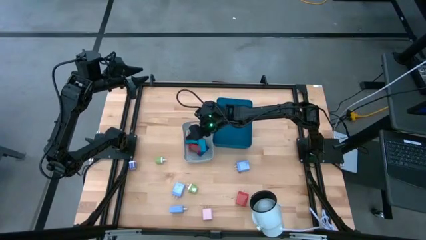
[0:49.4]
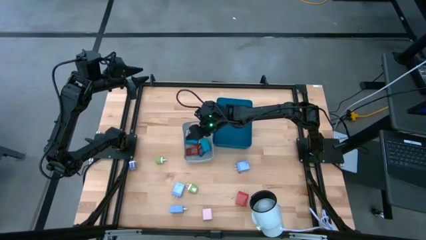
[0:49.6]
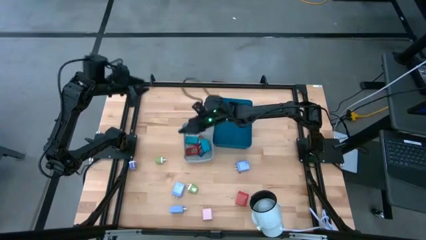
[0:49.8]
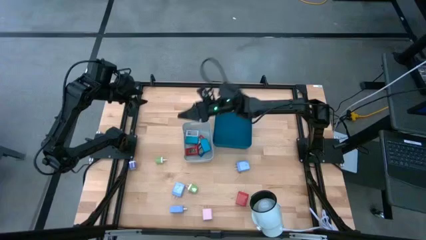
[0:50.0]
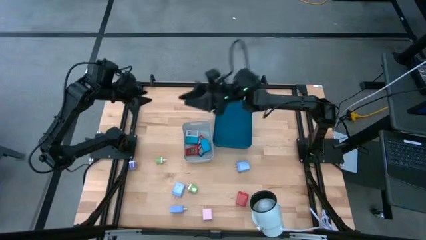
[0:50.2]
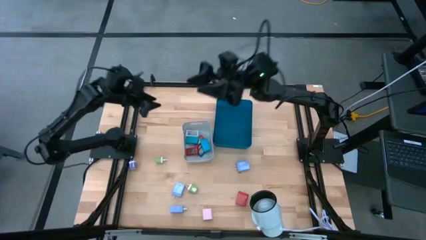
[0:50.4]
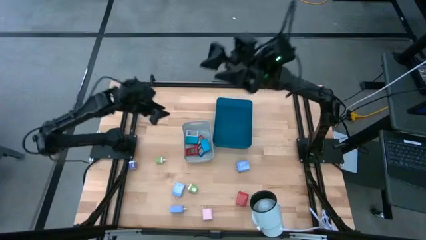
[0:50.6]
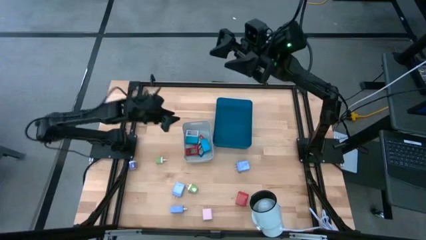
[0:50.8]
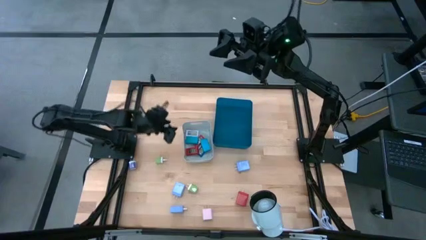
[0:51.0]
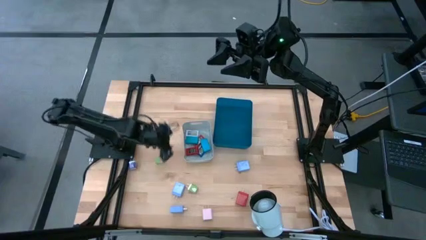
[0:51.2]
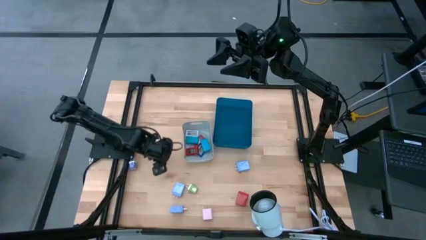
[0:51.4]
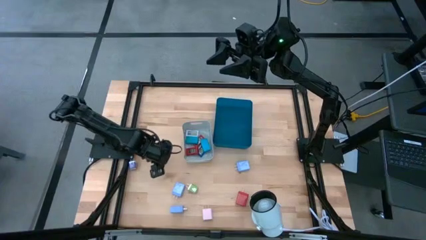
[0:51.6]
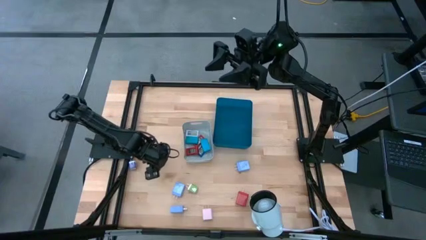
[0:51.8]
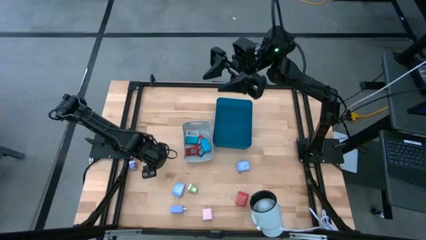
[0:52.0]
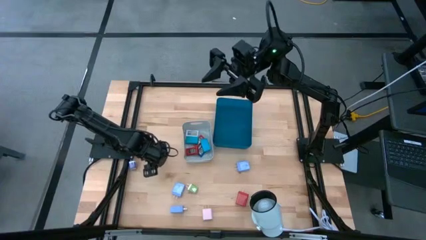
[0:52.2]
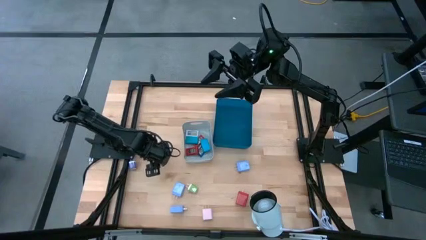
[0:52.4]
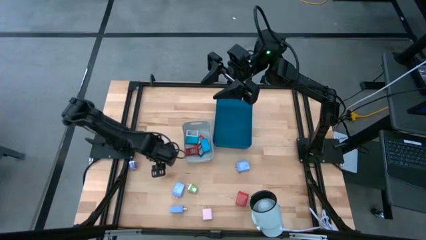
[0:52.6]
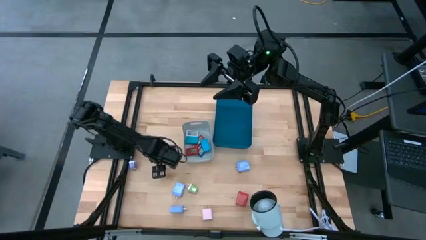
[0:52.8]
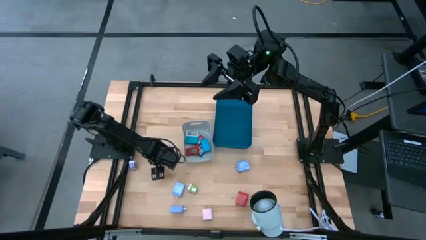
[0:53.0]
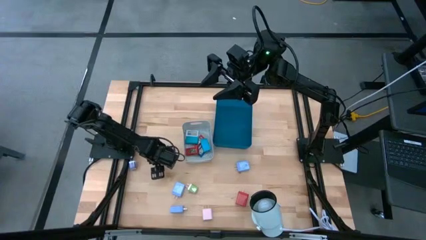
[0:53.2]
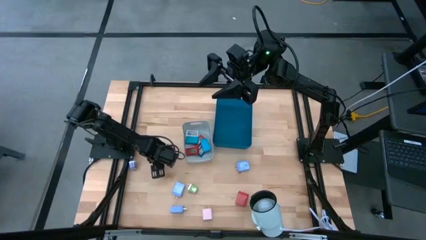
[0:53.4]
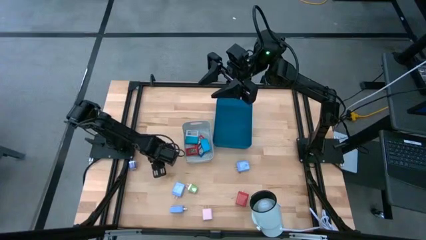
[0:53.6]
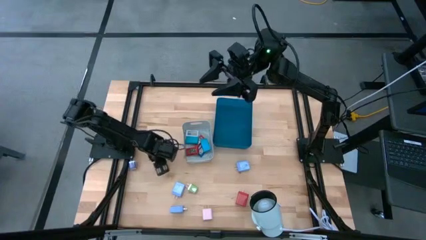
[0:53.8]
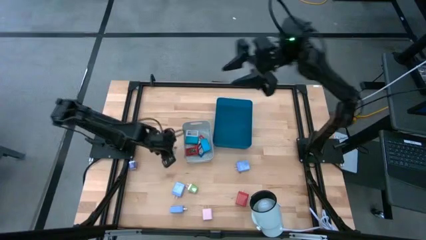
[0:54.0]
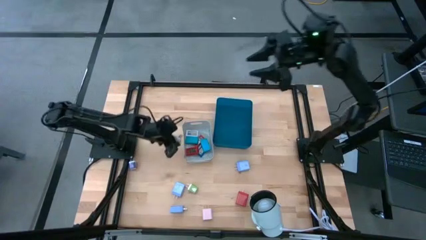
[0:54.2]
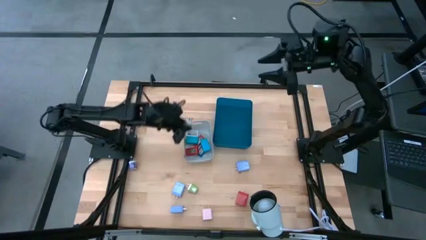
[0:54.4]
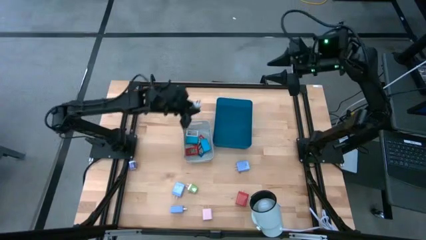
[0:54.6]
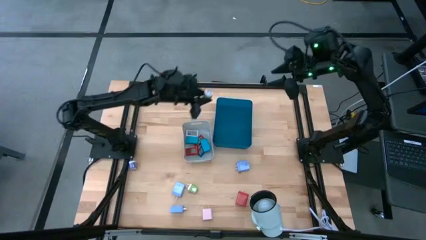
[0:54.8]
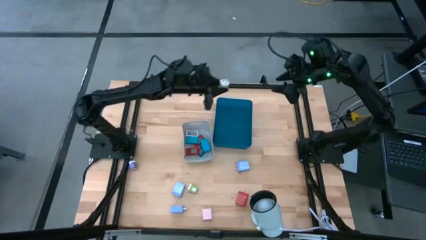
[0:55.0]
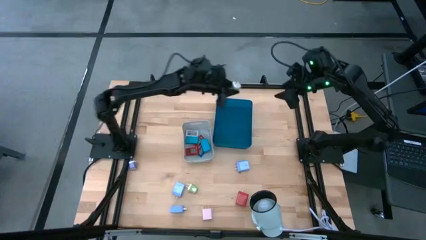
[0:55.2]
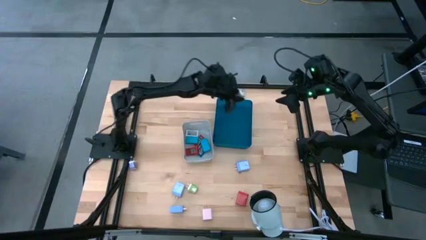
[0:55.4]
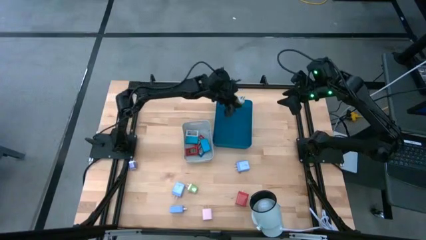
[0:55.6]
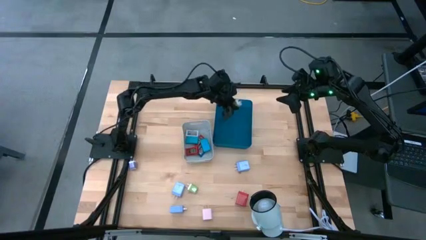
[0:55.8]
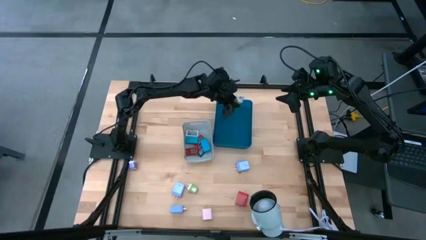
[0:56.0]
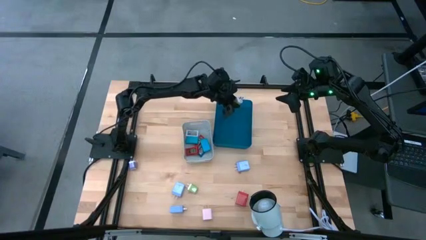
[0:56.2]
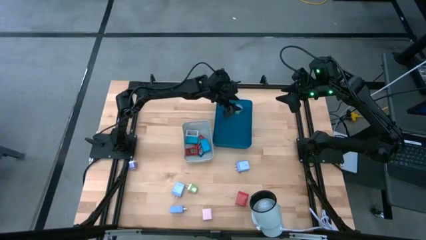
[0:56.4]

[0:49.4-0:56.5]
Task: Pick & Place Office items
Put the top green charger adapter into the blue bin

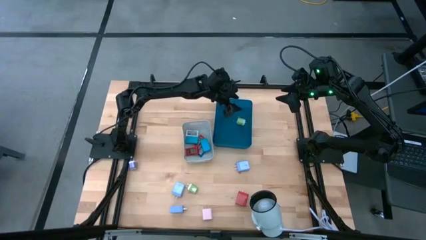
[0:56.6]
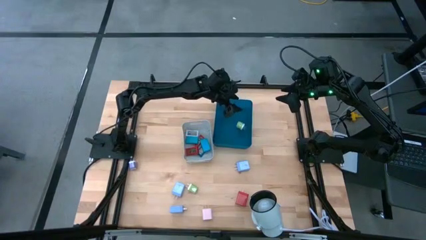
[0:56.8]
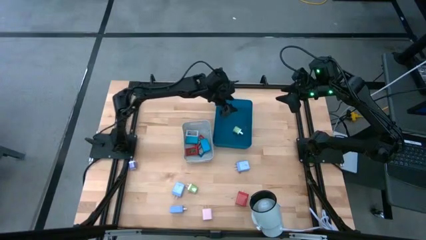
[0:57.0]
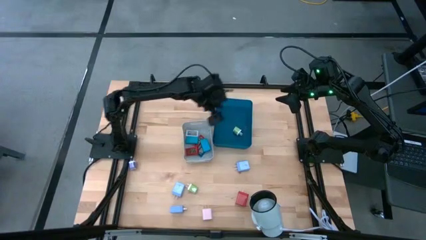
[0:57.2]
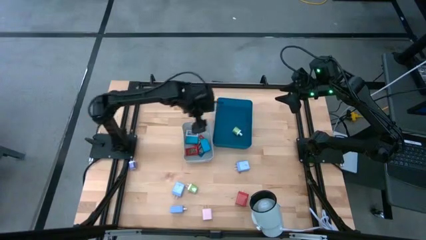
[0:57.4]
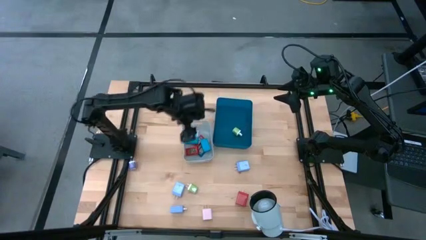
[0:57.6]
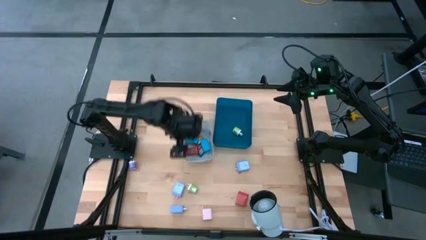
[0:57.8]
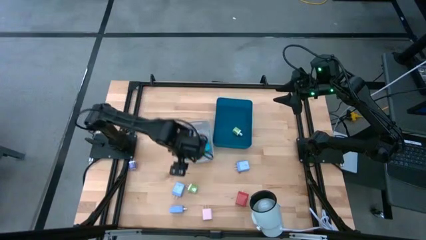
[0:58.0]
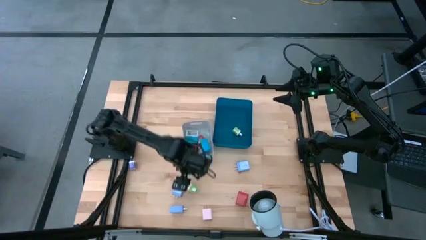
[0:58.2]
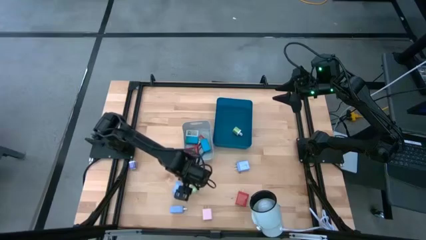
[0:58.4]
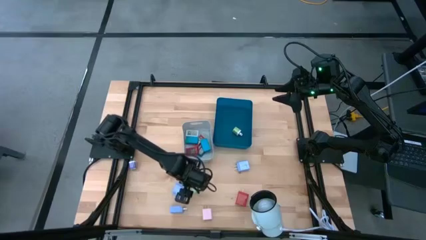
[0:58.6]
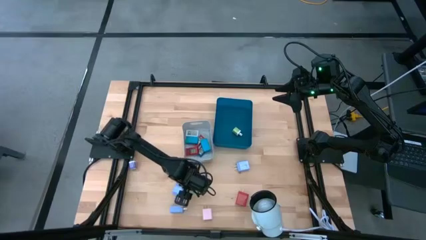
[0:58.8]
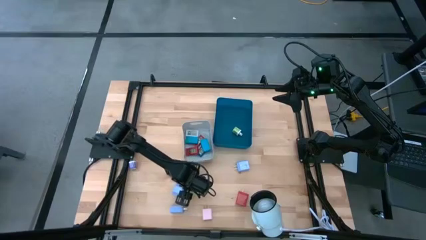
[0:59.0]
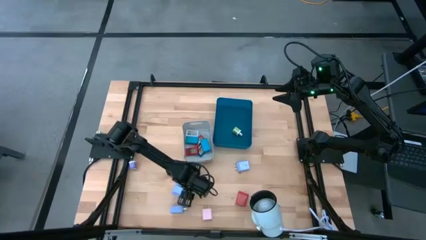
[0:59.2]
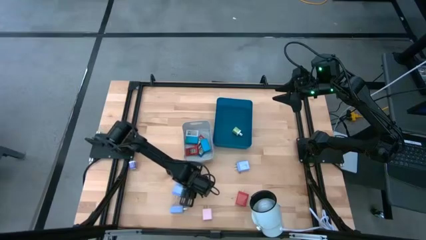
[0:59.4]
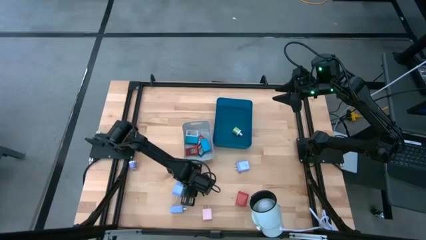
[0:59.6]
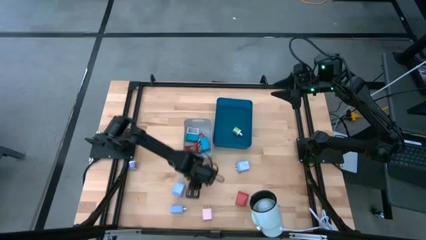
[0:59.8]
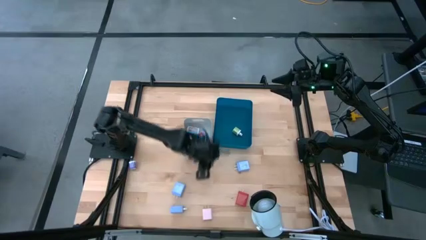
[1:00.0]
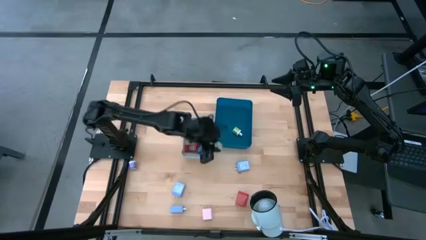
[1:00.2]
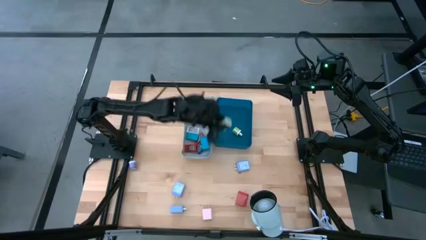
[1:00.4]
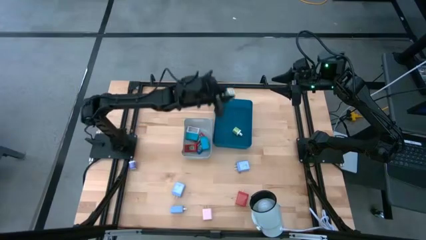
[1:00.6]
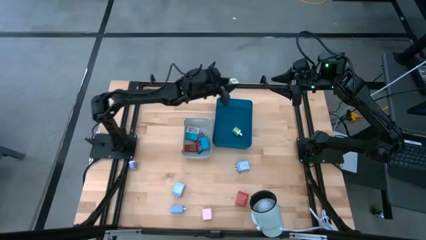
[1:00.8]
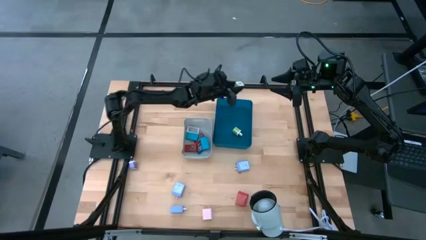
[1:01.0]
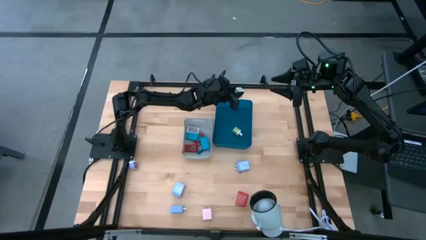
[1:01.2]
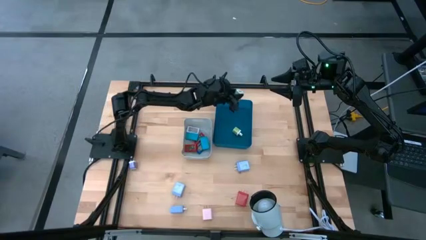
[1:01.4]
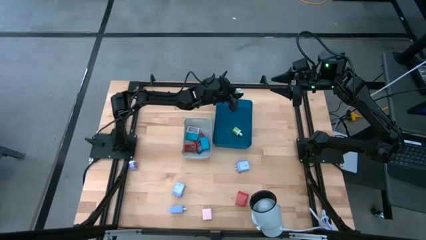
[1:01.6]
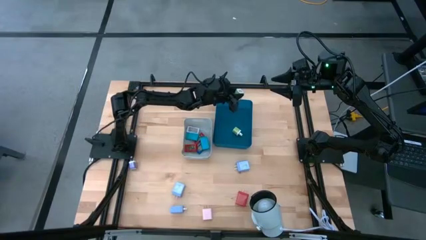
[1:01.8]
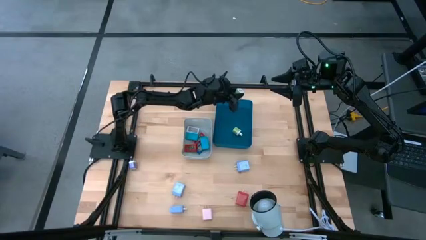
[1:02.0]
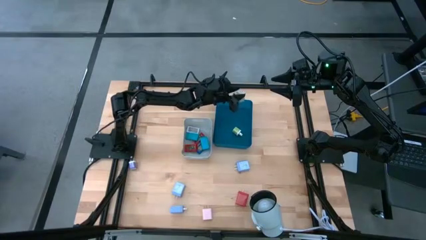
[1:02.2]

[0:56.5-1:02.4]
Put the green charger adapter into the blue bin

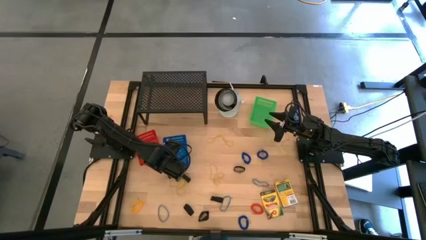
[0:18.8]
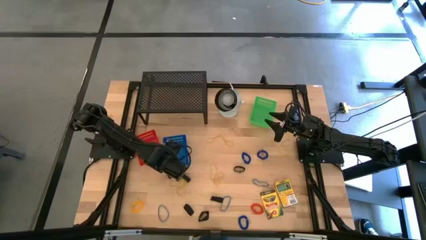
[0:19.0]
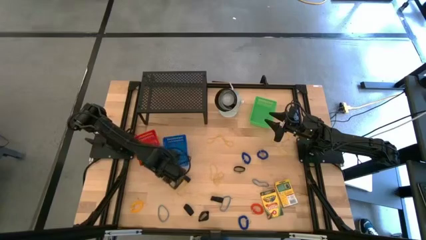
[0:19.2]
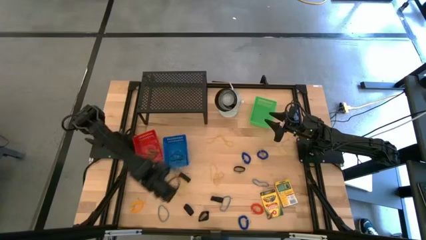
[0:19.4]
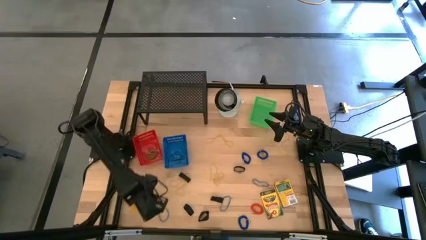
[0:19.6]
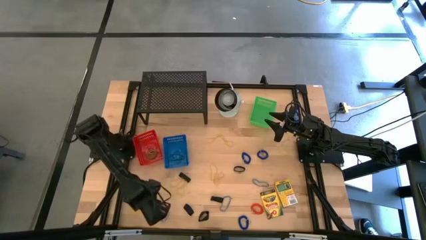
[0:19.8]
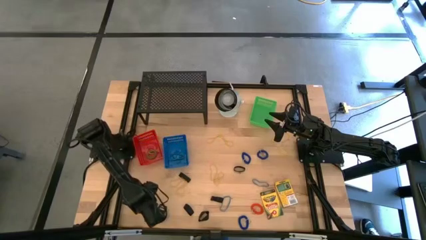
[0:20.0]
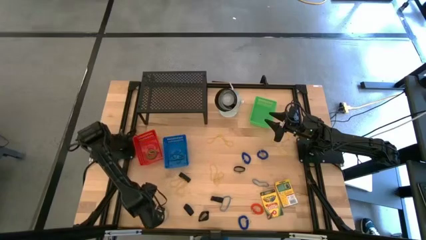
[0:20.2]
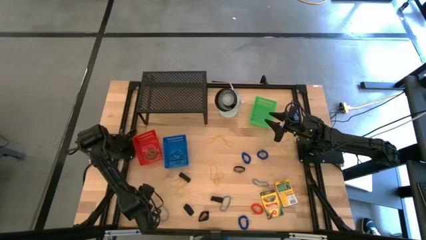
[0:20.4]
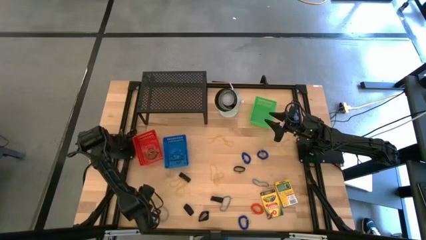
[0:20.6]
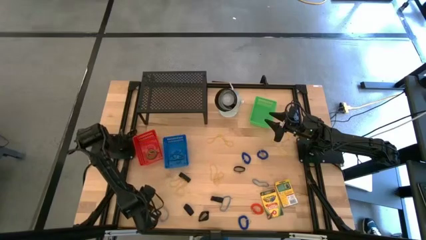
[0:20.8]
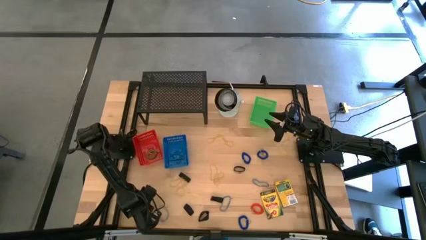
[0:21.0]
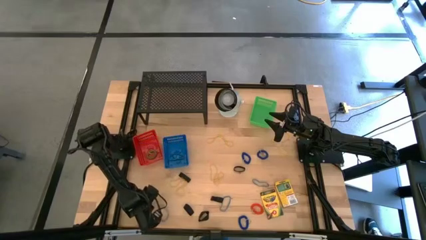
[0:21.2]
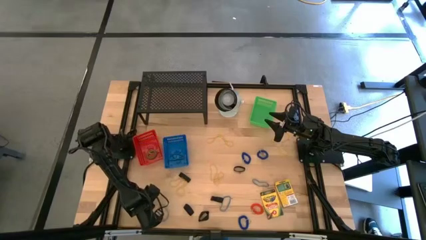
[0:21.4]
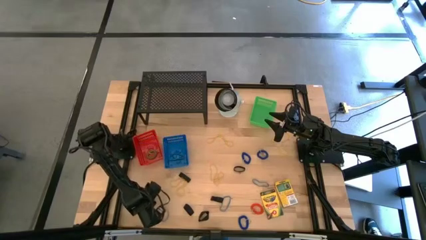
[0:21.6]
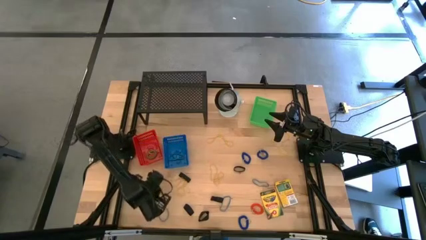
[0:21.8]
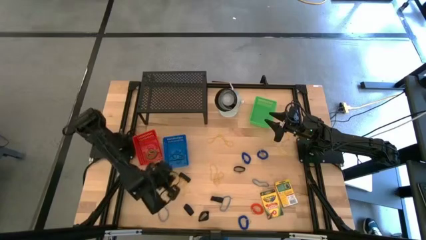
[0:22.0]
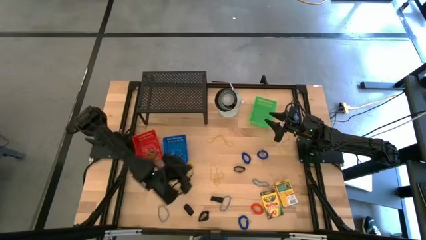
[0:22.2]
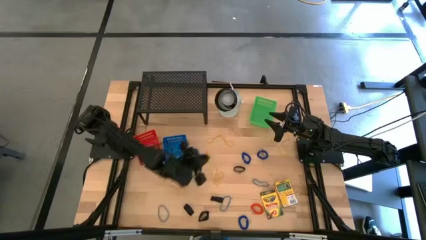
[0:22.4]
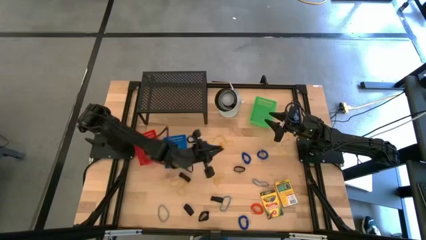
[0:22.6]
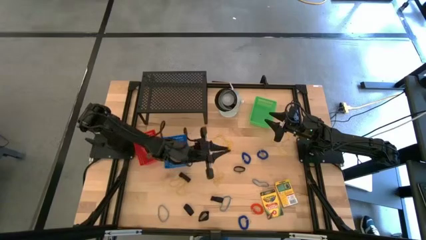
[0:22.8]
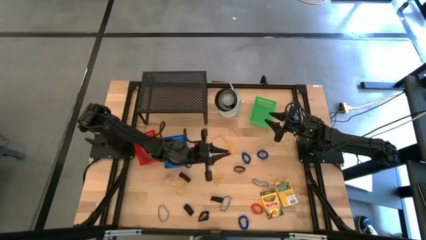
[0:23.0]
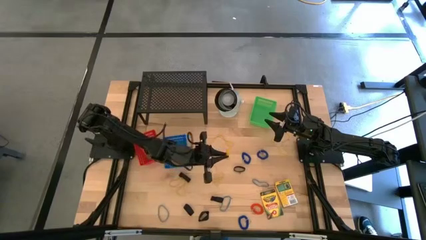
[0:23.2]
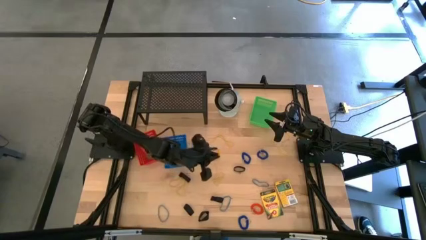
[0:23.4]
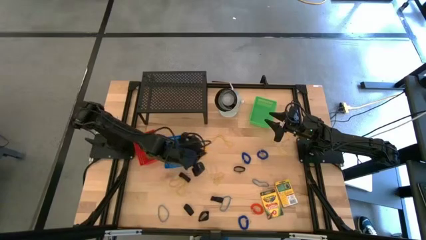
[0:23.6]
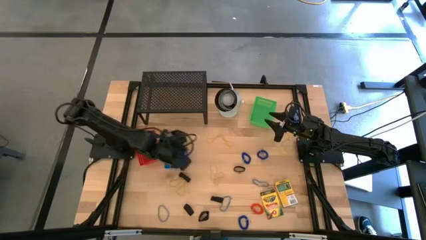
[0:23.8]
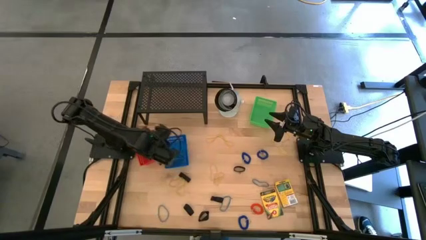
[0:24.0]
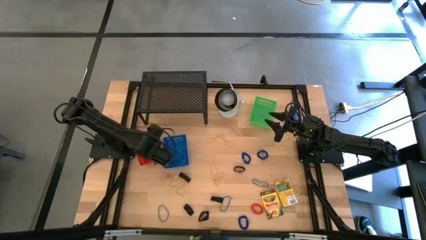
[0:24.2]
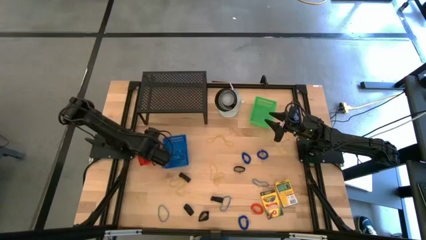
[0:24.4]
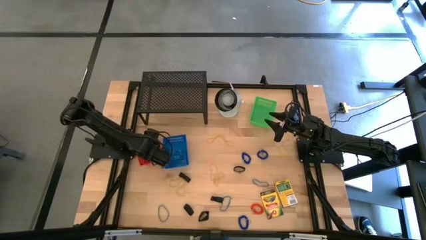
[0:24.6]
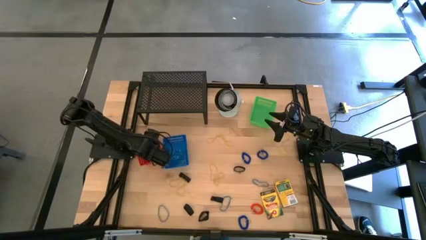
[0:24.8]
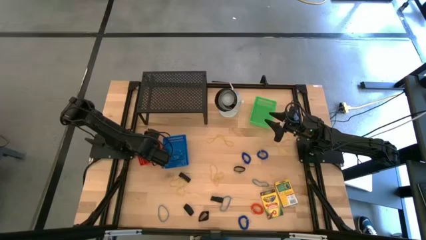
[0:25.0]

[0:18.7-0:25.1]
Task: Pick & Place Office Desk Supplies
Put the yellow spring keychain into the red bin
